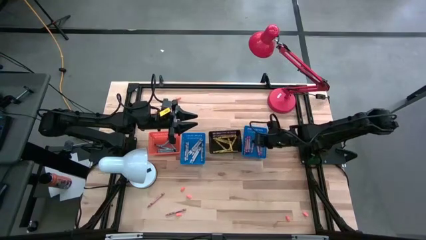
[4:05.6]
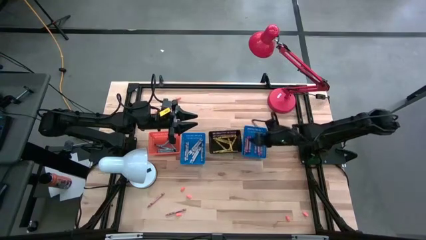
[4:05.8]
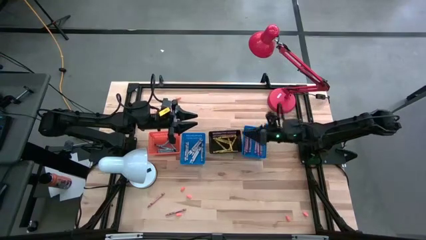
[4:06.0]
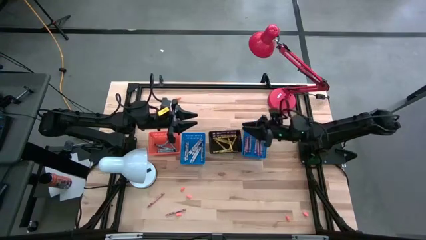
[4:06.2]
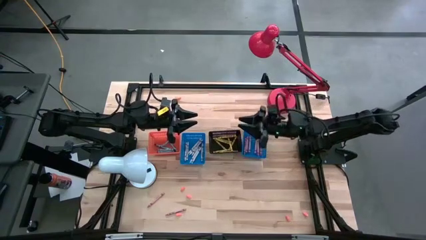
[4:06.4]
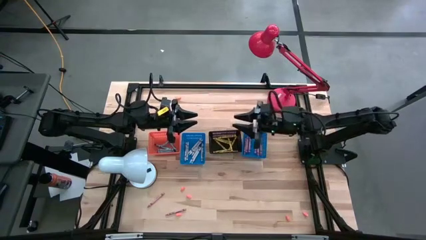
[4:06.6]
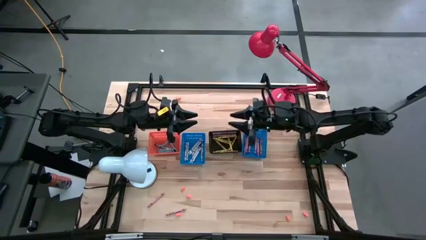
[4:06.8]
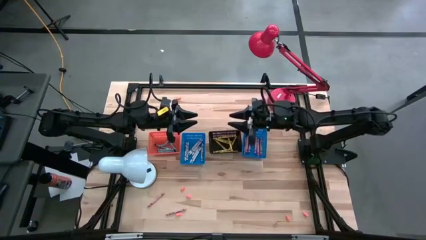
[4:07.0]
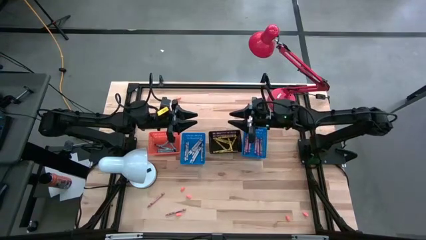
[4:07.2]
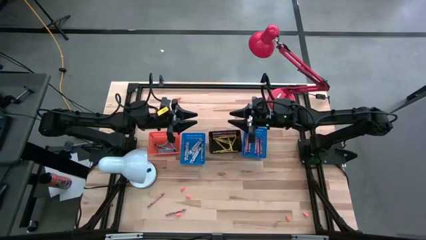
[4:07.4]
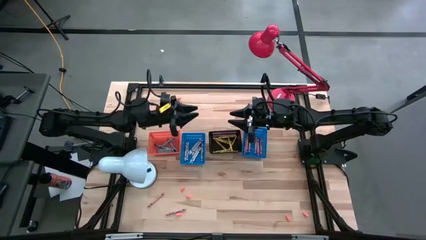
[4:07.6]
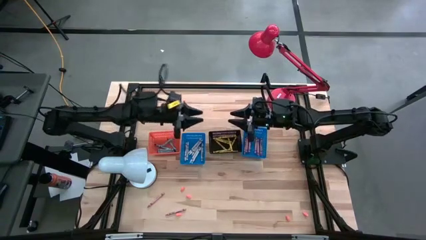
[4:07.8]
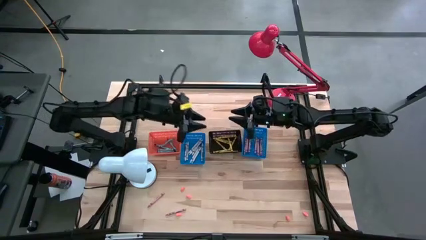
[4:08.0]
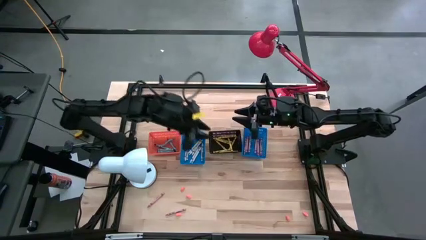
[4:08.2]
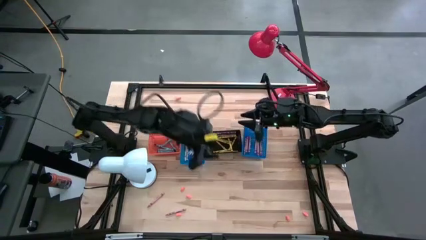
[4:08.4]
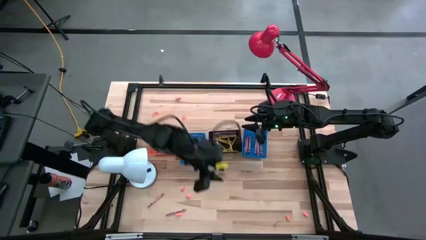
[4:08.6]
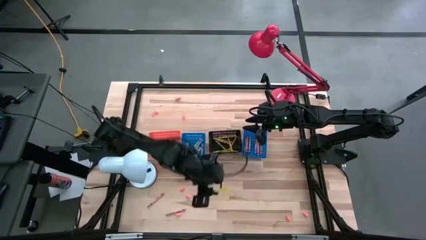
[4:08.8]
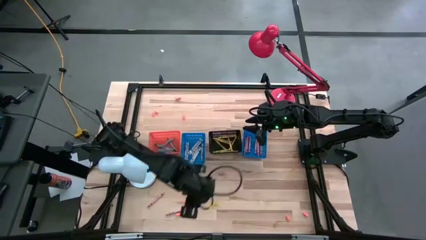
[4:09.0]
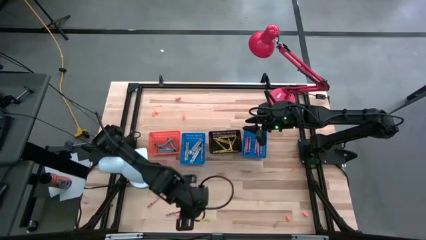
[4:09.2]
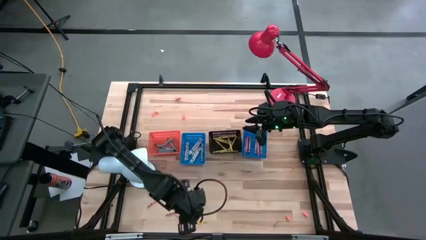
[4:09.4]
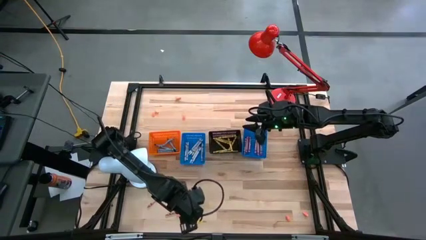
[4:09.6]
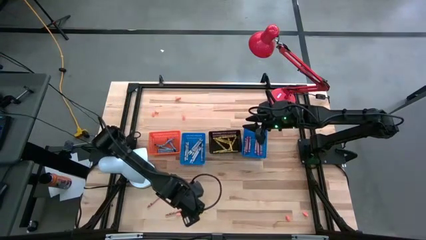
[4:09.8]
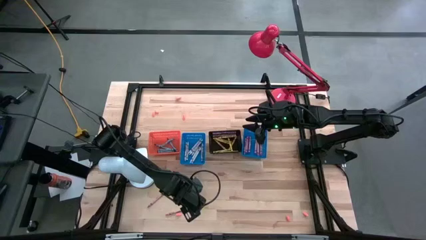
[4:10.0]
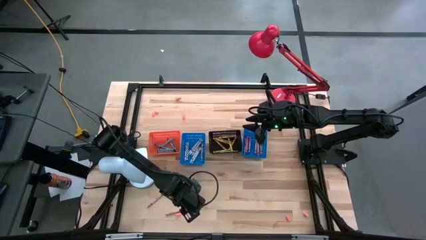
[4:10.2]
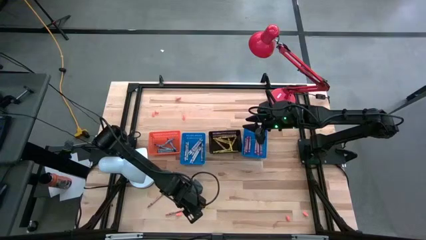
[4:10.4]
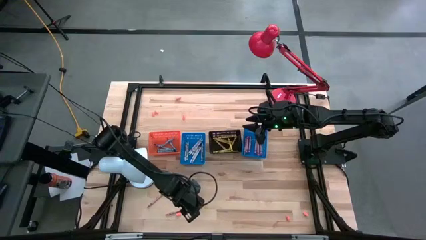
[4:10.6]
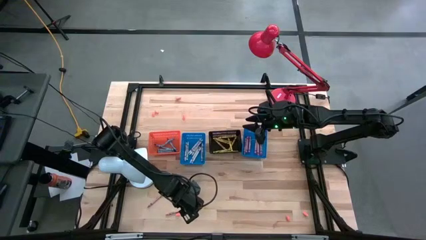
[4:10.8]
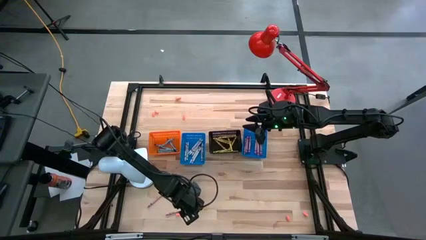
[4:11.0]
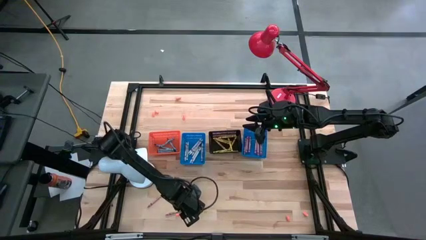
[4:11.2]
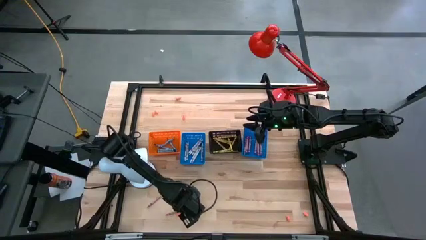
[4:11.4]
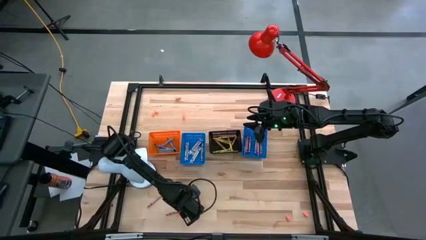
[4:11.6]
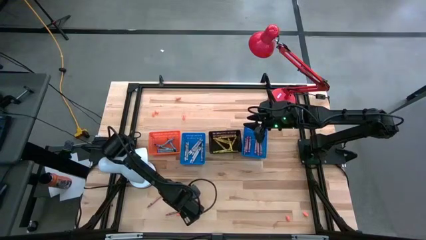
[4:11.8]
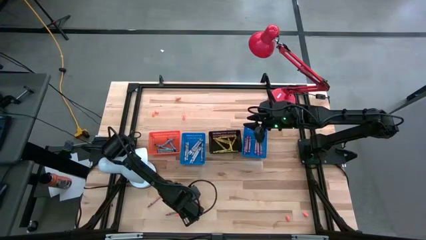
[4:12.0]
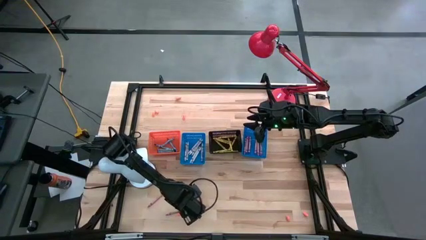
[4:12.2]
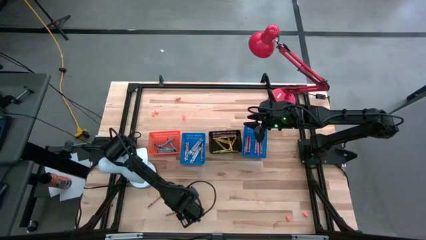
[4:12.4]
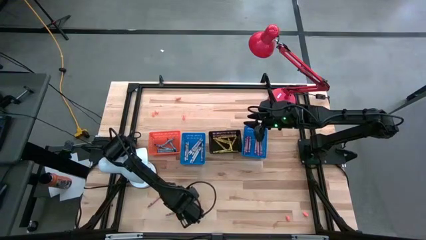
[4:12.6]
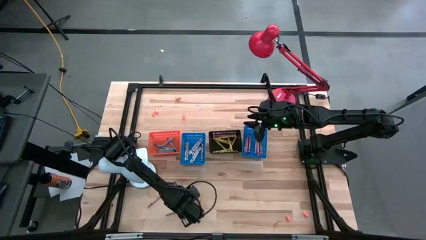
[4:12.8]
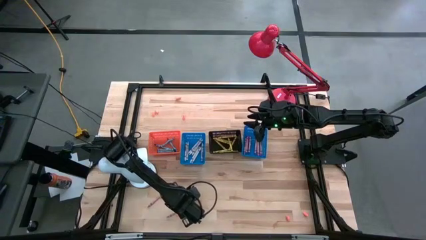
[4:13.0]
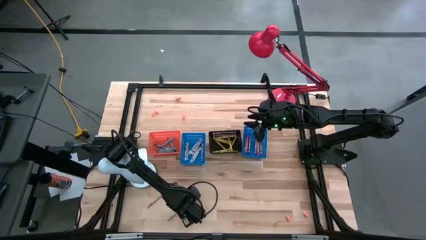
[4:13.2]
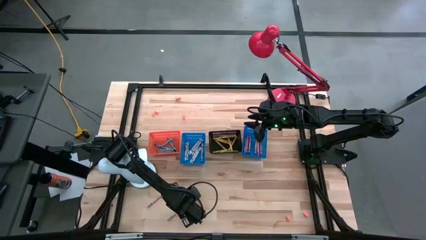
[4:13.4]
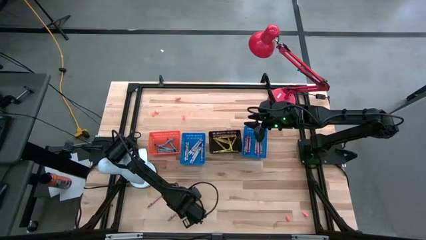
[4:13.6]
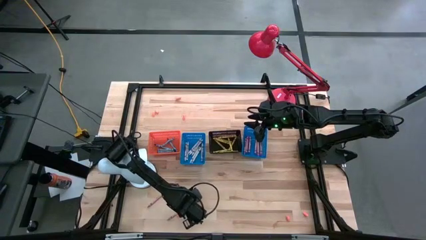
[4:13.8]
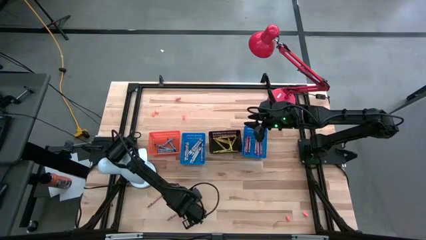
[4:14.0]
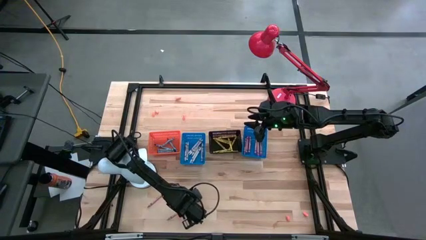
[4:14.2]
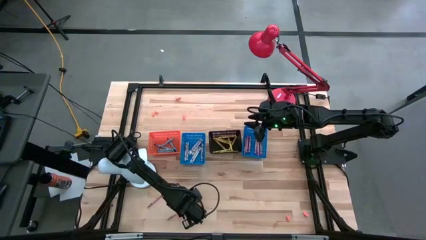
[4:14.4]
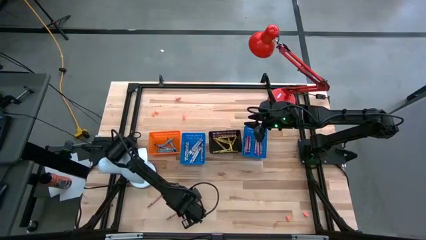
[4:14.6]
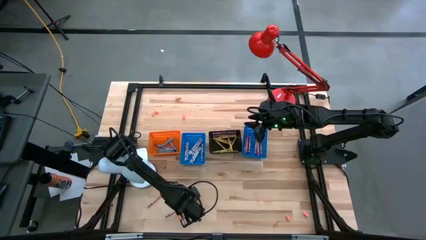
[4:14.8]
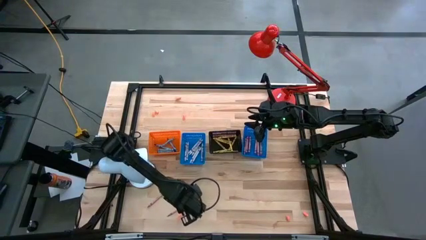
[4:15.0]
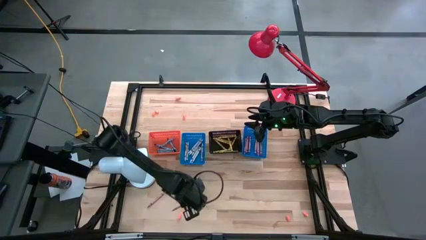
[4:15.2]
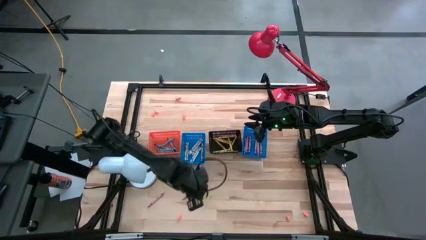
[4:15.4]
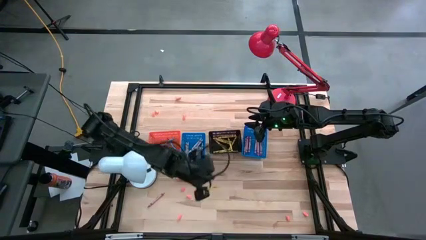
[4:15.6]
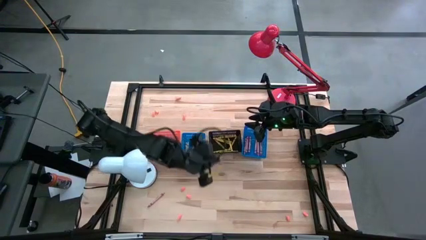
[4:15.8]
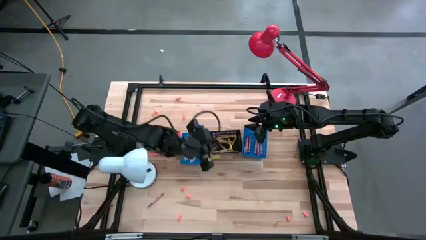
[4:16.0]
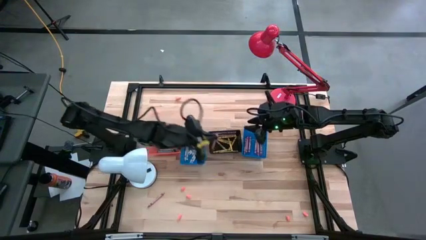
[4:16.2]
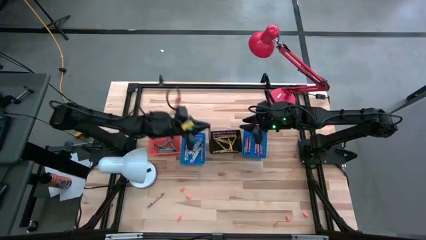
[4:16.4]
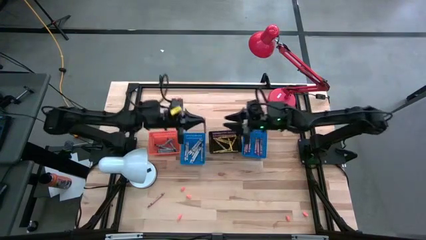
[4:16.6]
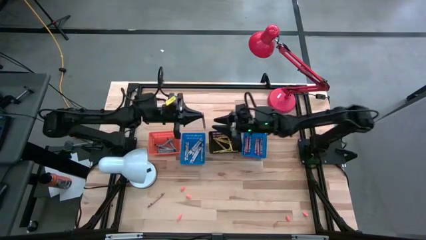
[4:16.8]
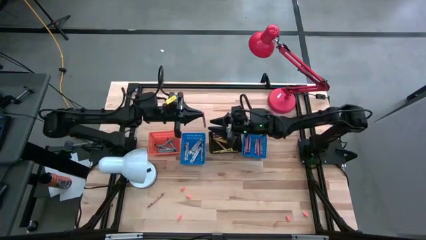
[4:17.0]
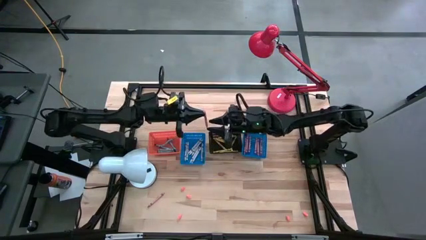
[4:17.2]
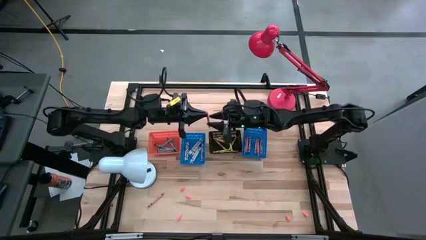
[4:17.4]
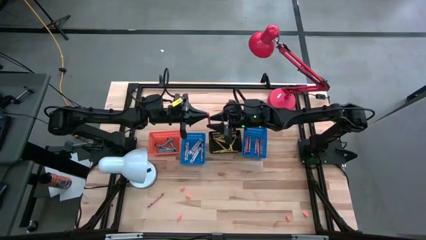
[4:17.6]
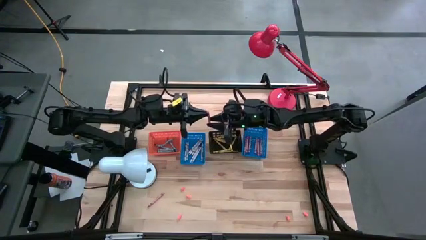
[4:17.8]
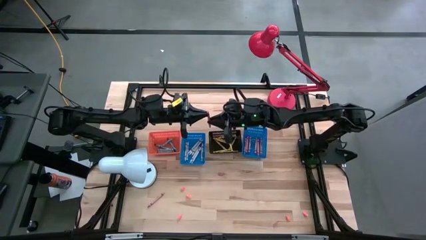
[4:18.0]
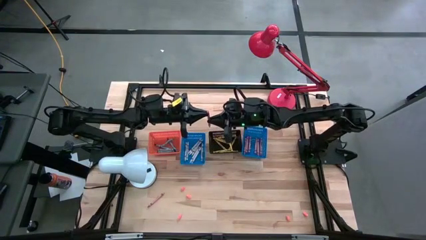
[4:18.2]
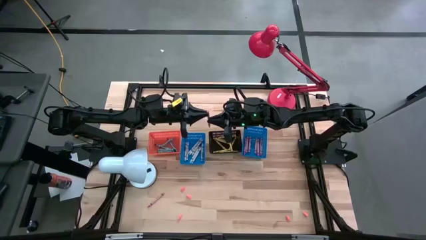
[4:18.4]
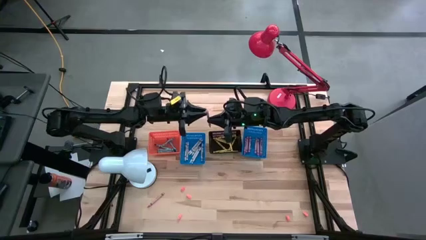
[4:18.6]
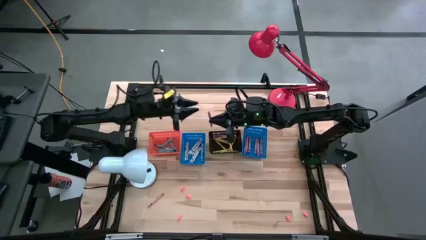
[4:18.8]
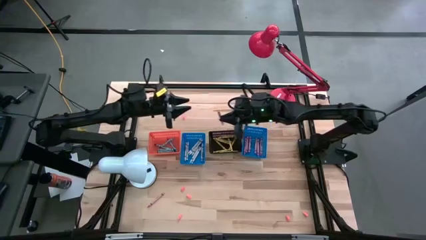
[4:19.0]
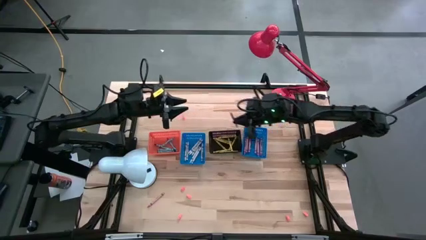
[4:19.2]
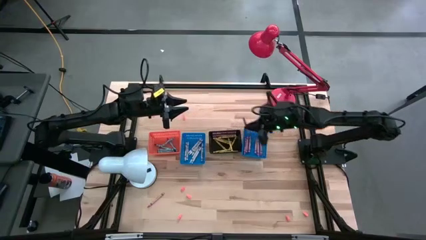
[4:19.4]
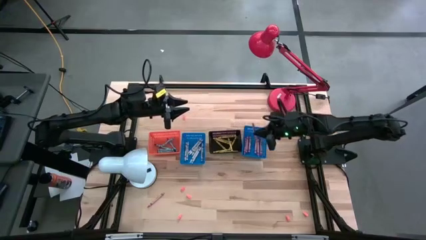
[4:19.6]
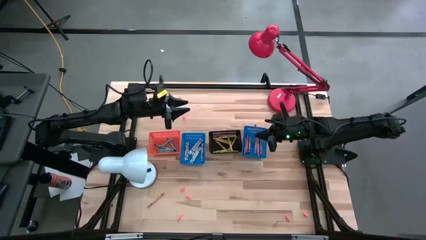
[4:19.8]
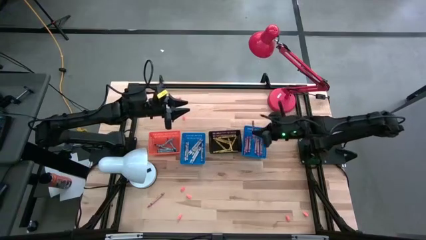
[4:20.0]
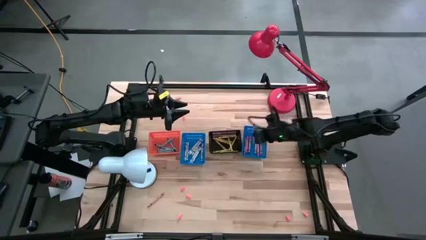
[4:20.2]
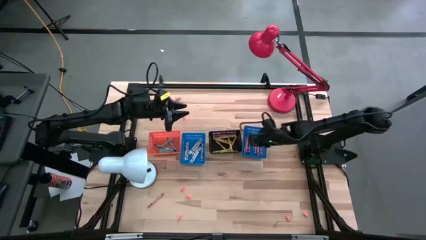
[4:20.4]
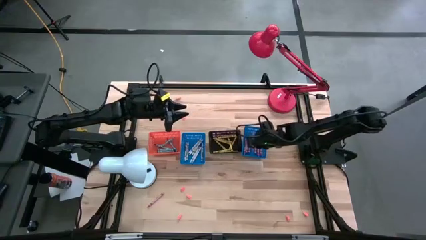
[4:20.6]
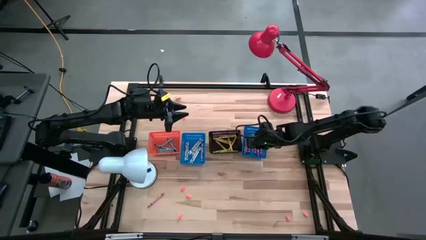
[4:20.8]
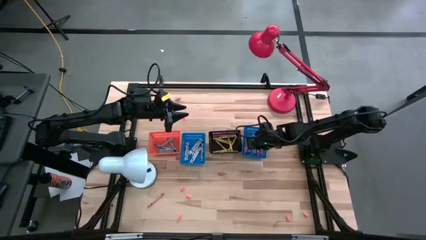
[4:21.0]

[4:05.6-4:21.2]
Task: Sort crayons
Put the bottom pink crayon into the right blue bin

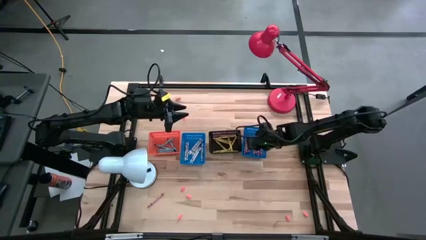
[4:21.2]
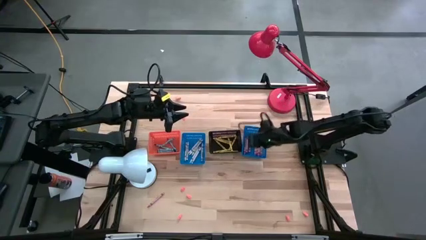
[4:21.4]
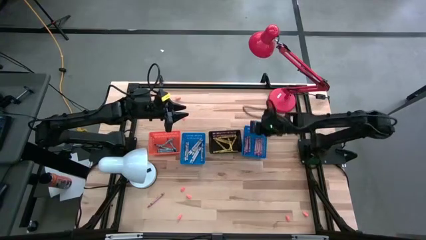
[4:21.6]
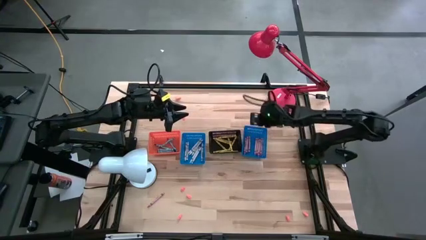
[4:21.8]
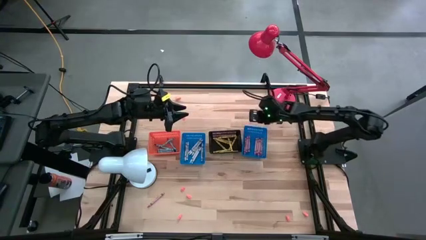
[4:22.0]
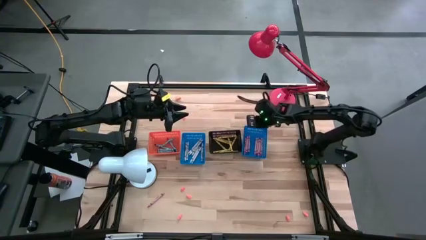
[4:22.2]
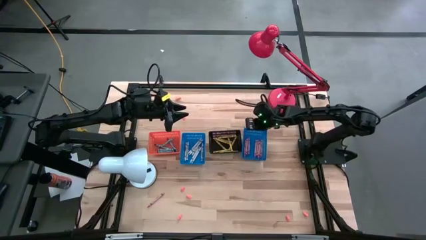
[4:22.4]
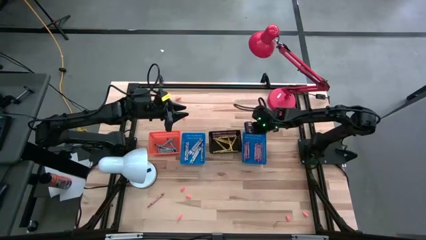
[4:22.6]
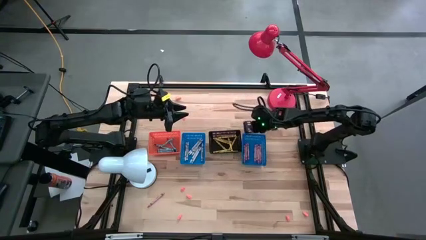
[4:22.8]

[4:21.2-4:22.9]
Adjust the right blue bin
